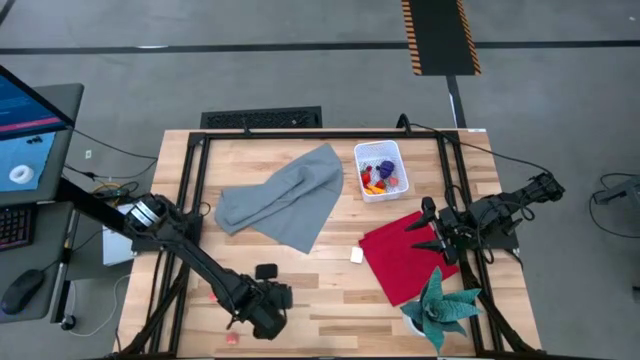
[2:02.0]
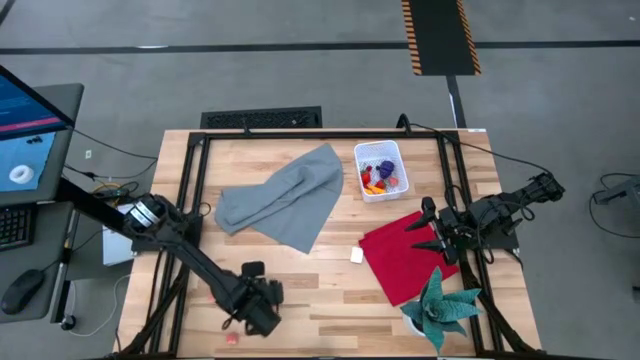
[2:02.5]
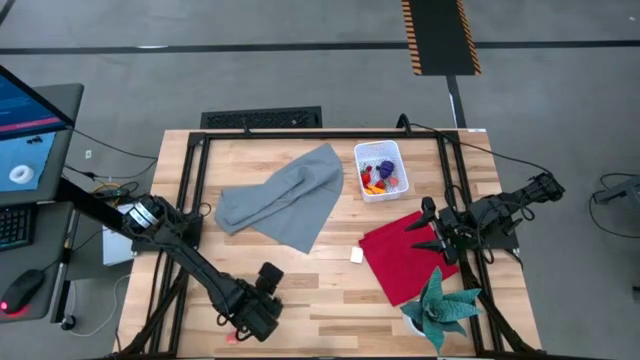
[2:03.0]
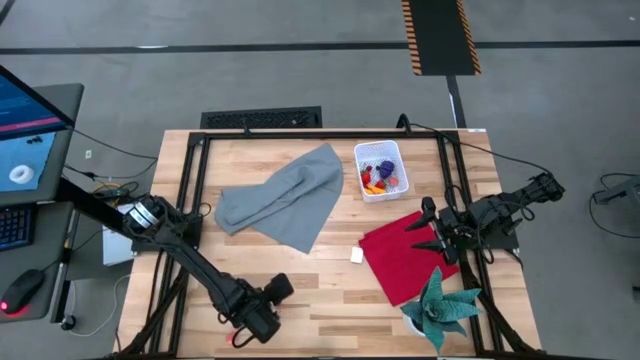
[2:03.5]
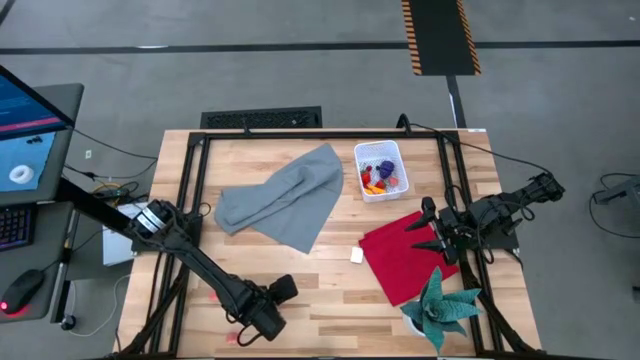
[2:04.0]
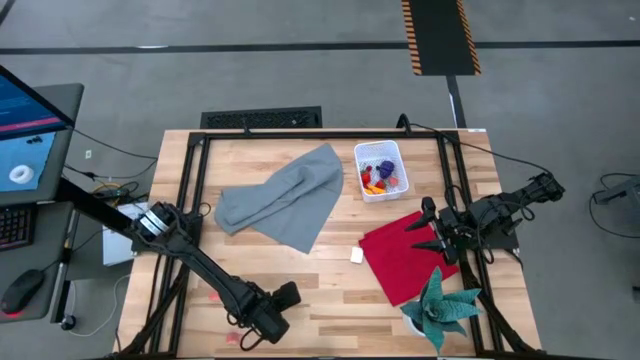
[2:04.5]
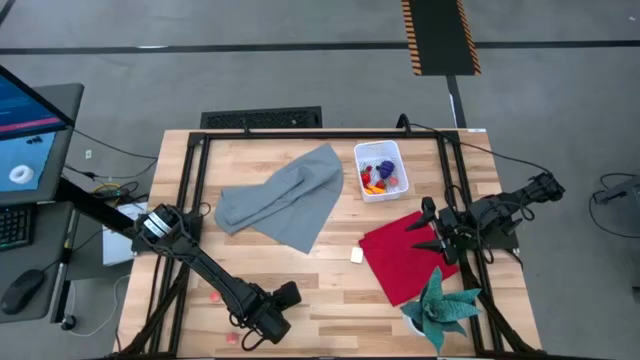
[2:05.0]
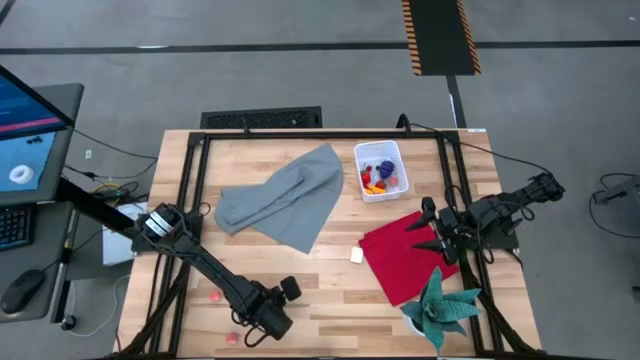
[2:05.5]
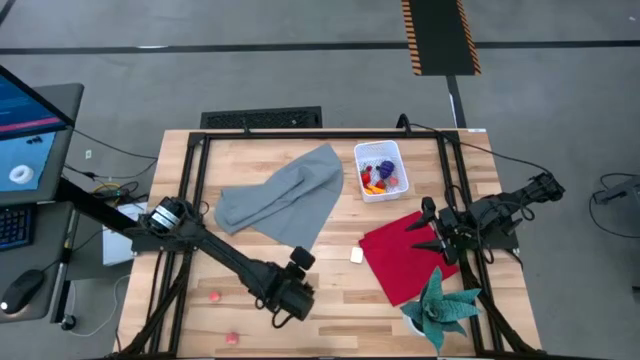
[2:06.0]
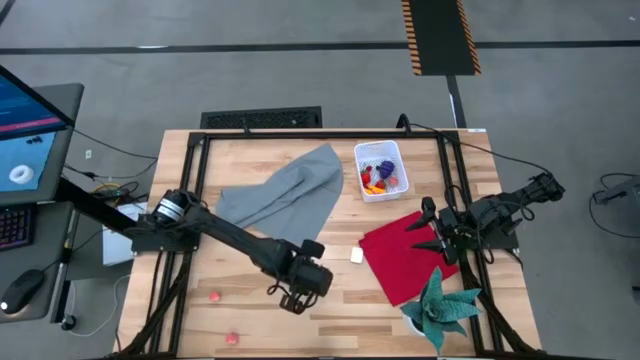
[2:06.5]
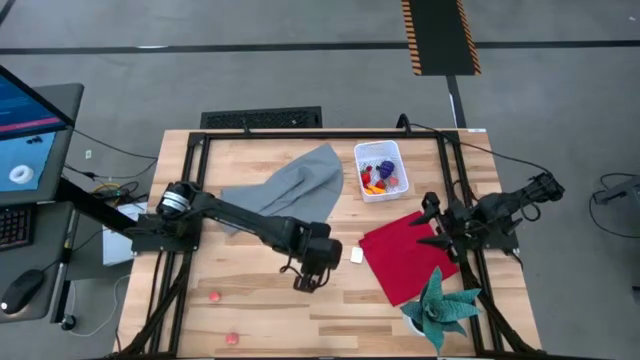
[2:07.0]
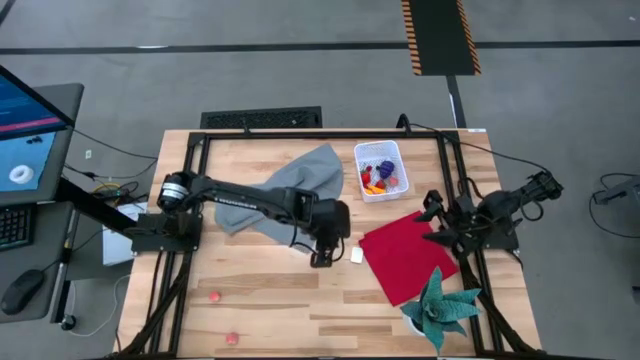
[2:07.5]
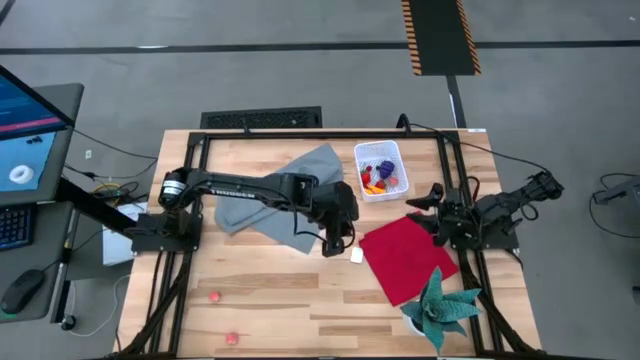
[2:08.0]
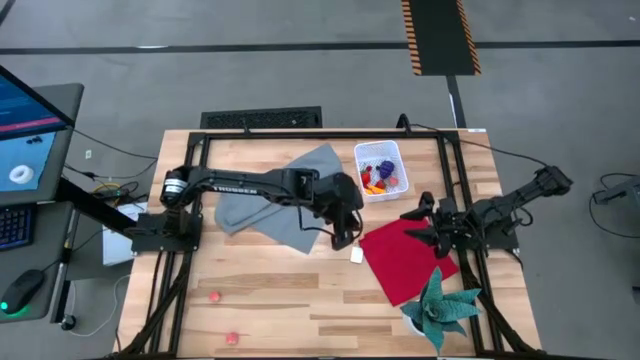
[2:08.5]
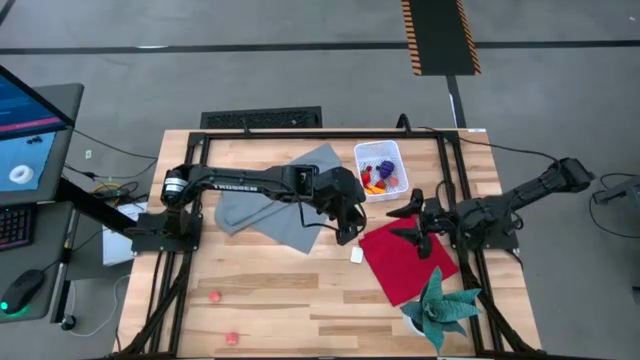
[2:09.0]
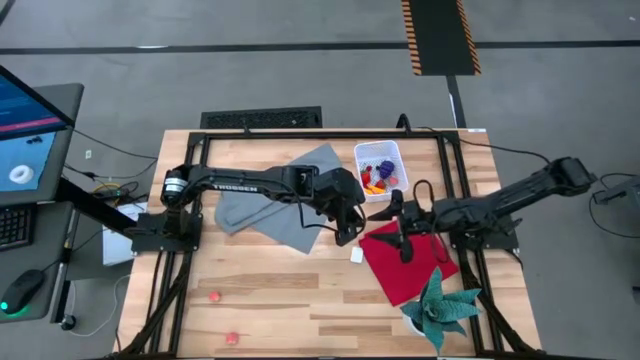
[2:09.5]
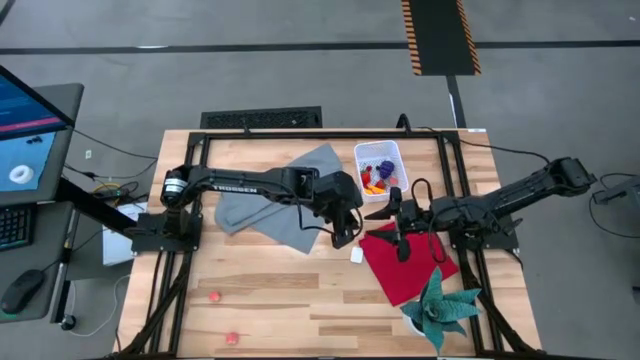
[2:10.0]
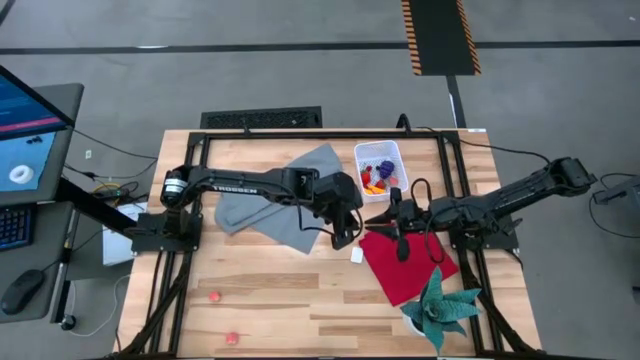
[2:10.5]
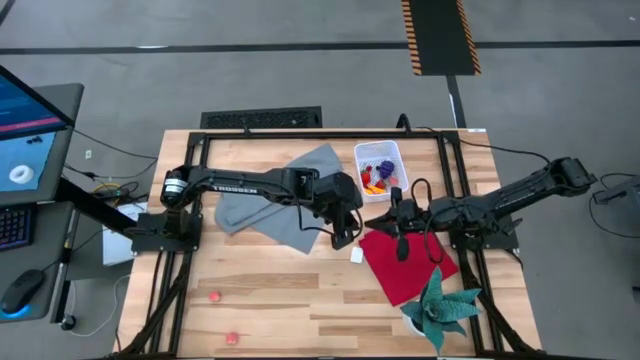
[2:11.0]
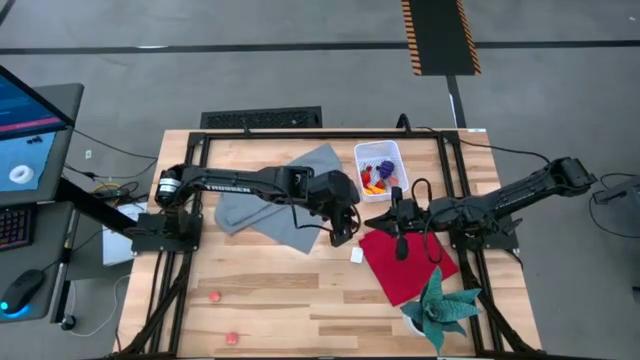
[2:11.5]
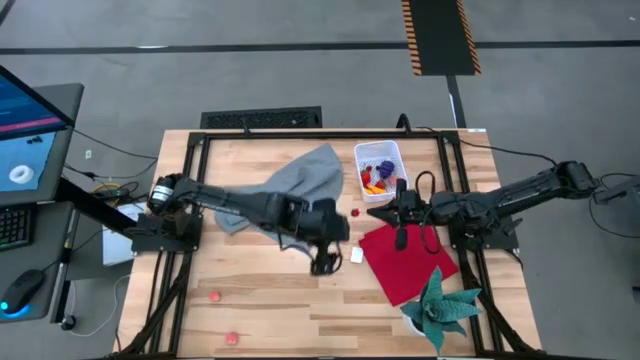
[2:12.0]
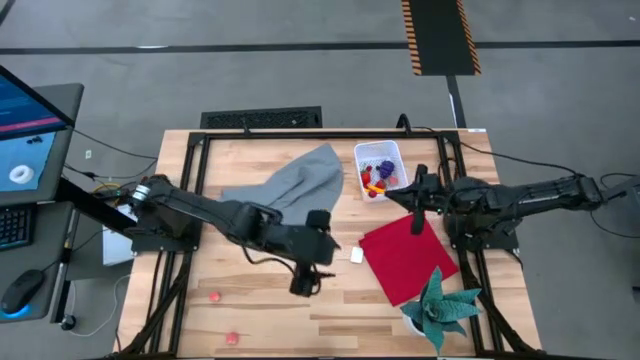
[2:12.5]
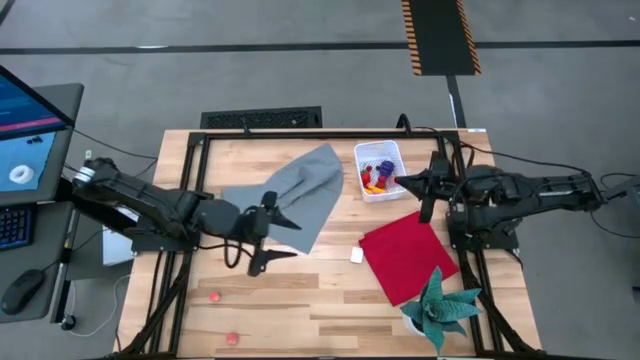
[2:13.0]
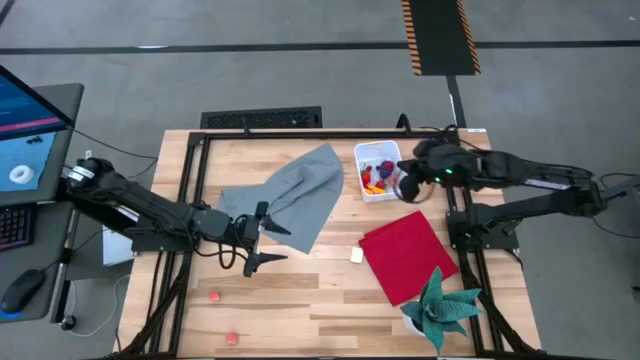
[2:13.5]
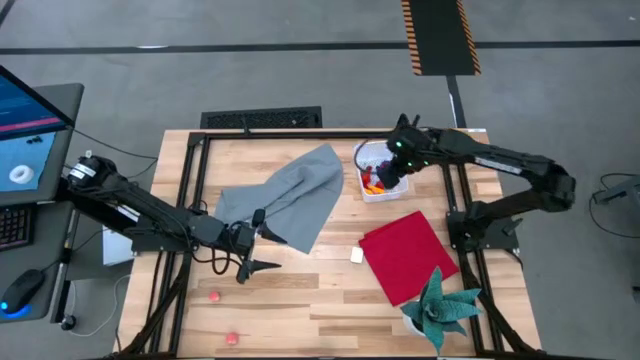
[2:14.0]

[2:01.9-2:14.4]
Task: Pick and placing Produce into tupperware
Put the red cherry into the white bin

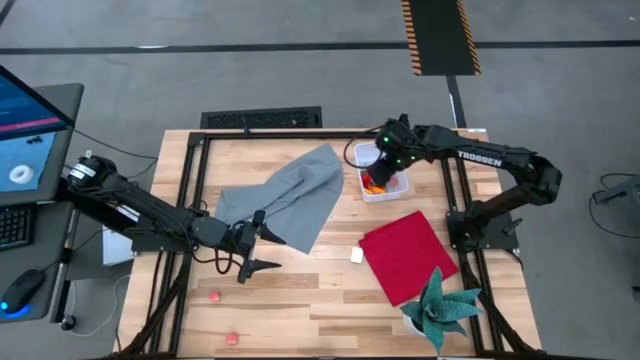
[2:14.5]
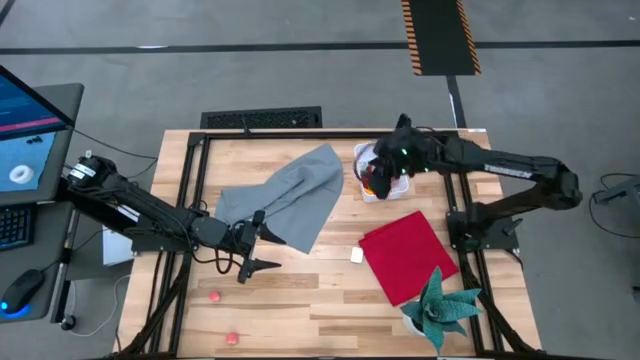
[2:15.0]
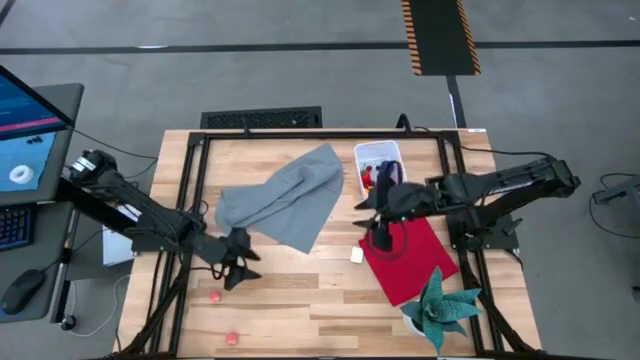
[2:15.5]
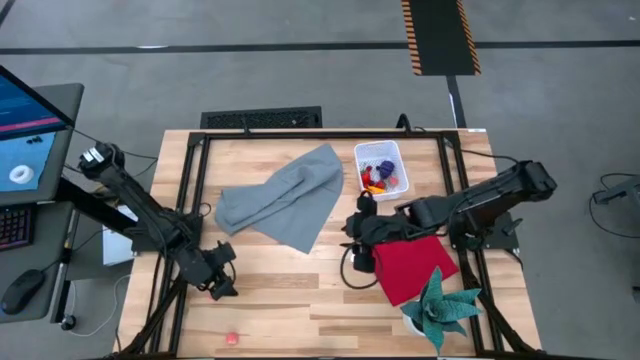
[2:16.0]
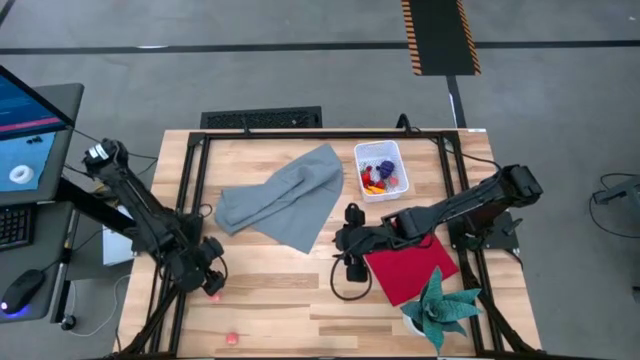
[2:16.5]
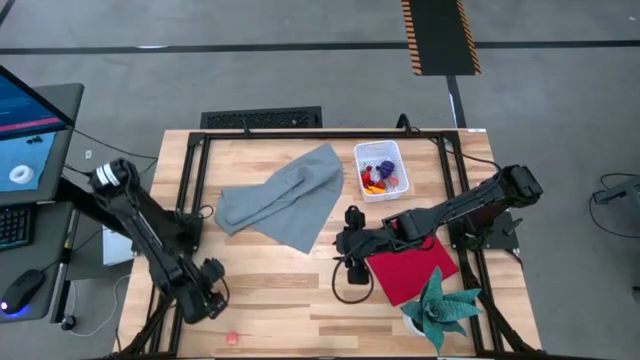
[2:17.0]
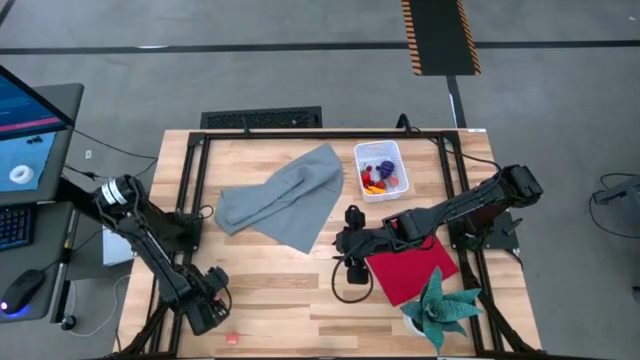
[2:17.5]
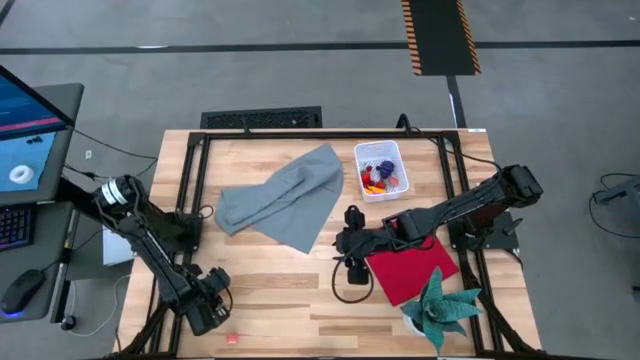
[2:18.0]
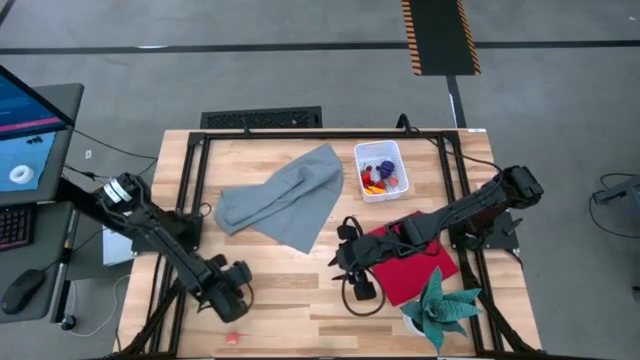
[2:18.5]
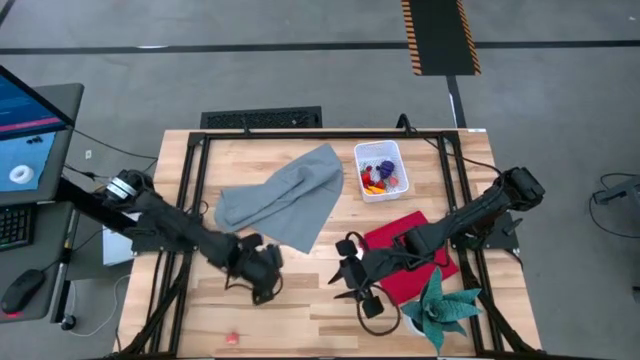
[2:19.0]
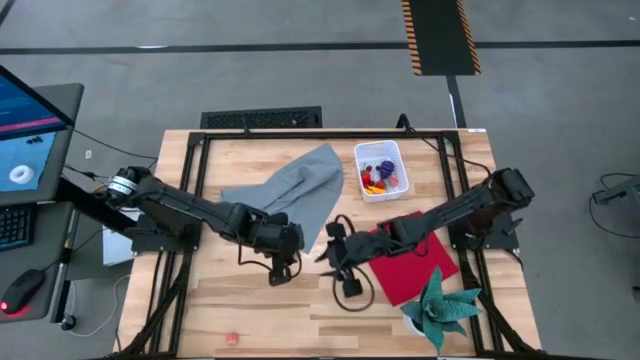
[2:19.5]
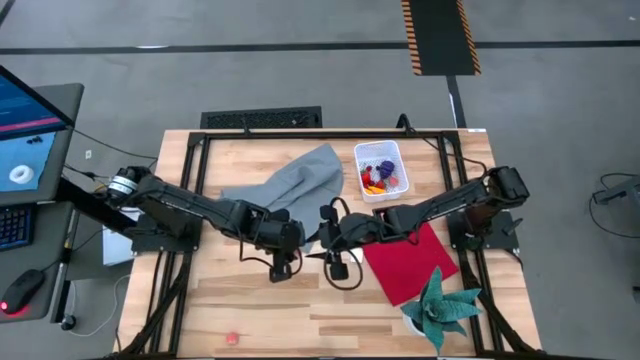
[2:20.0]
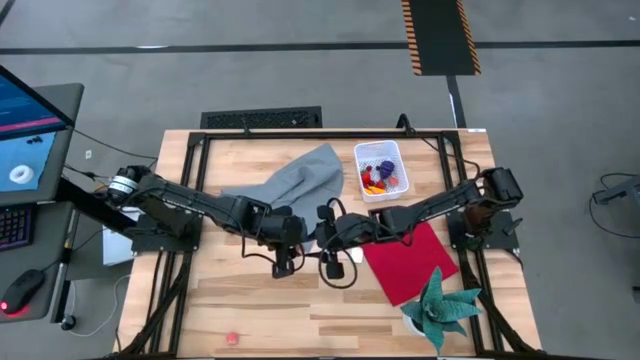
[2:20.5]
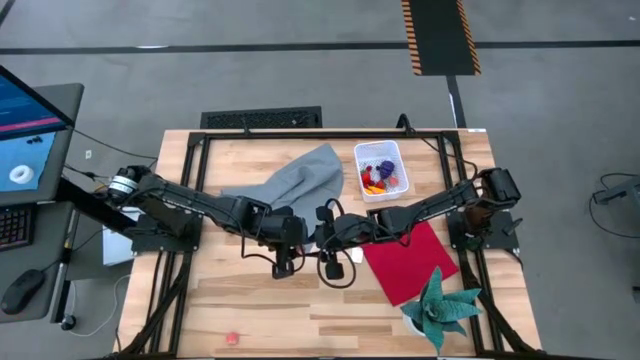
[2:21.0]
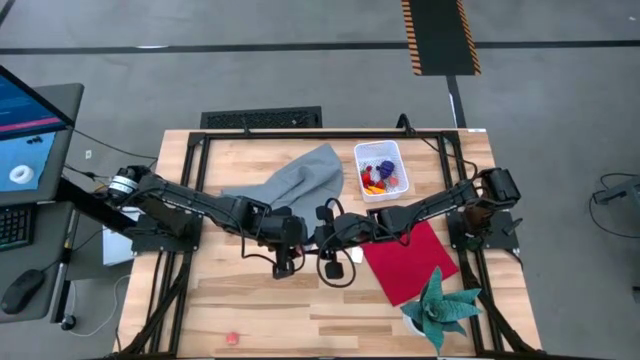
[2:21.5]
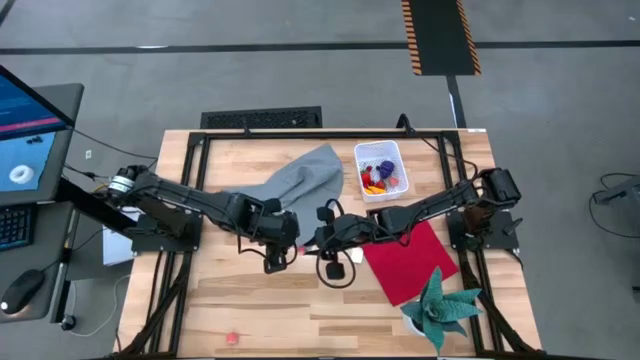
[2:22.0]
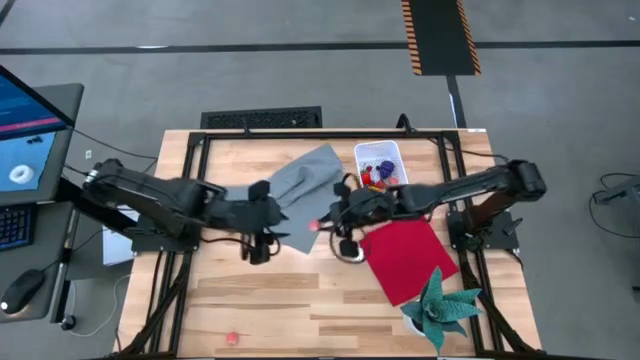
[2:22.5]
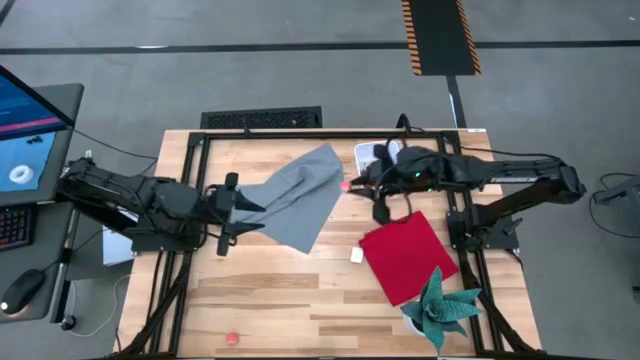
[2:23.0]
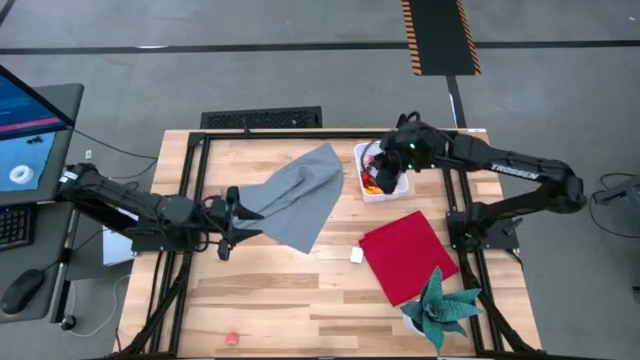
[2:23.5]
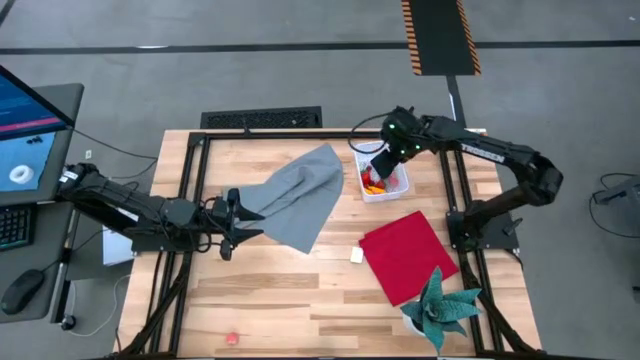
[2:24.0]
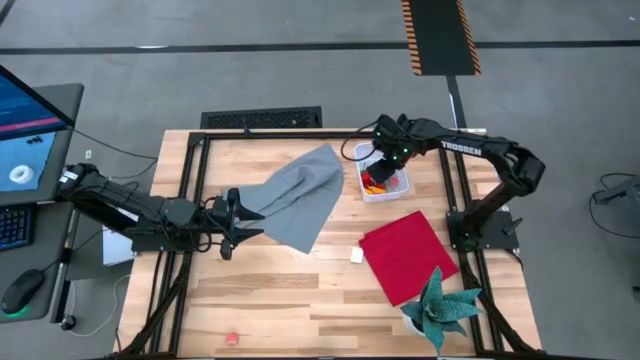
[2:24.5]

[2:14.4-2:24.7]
Put the pink peach into the white bin
